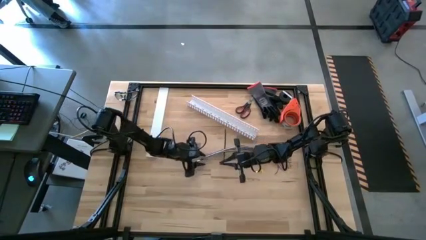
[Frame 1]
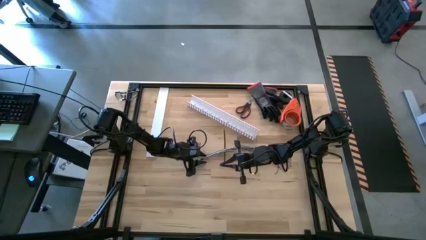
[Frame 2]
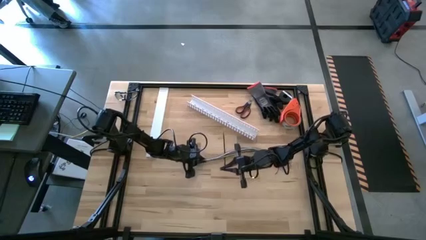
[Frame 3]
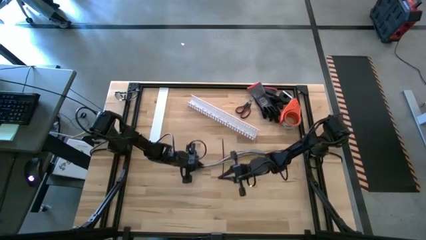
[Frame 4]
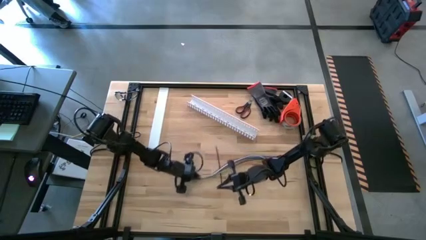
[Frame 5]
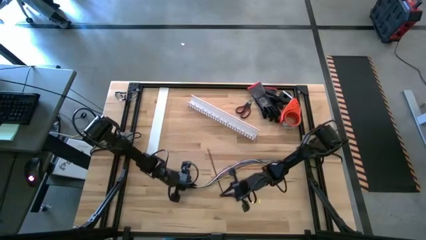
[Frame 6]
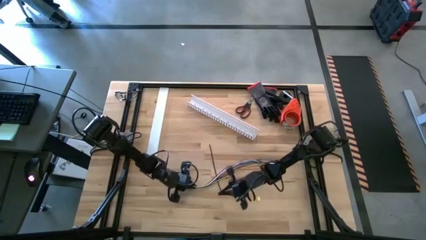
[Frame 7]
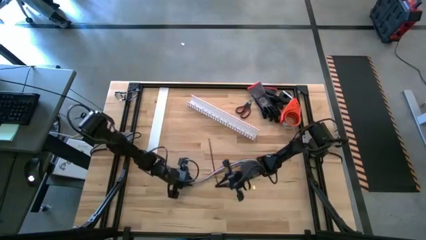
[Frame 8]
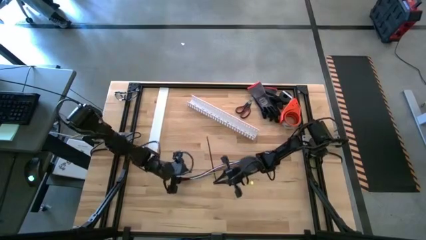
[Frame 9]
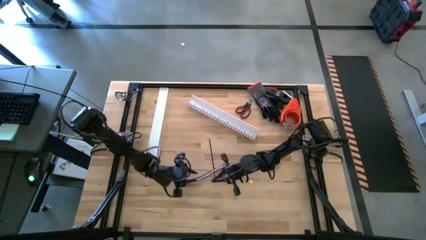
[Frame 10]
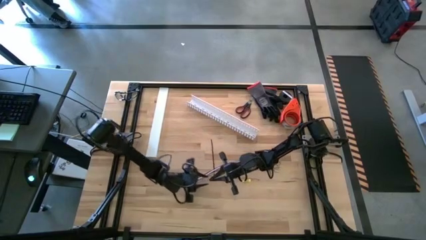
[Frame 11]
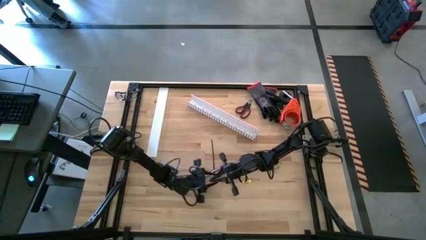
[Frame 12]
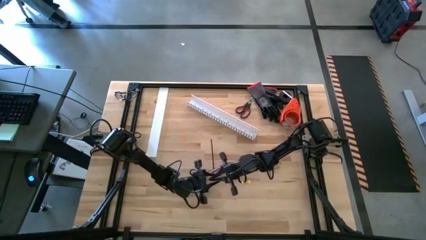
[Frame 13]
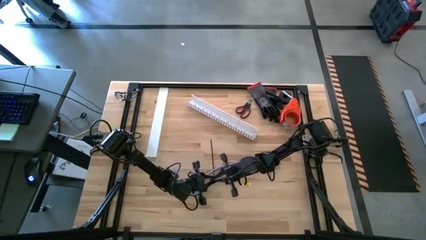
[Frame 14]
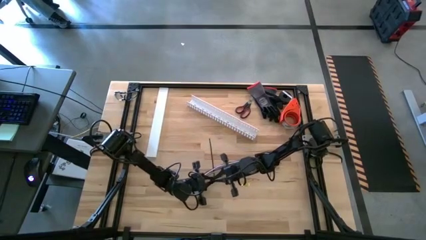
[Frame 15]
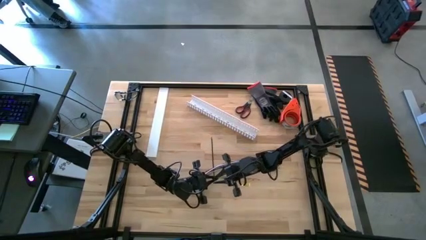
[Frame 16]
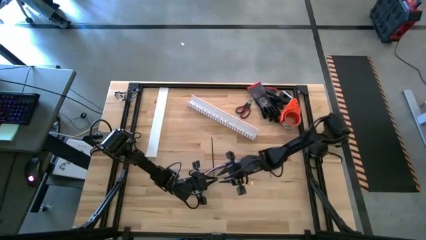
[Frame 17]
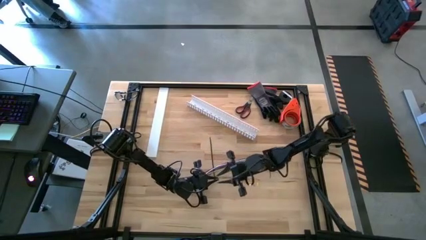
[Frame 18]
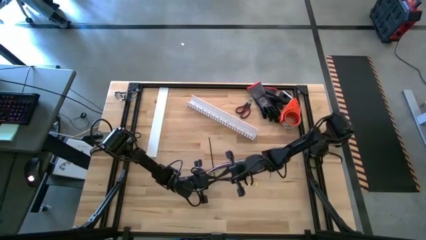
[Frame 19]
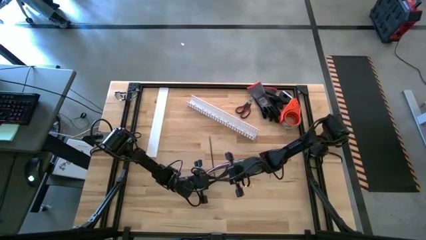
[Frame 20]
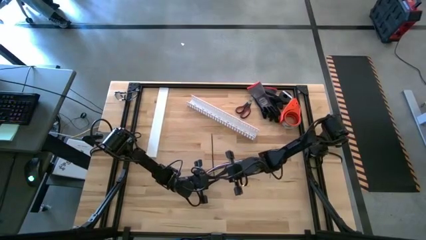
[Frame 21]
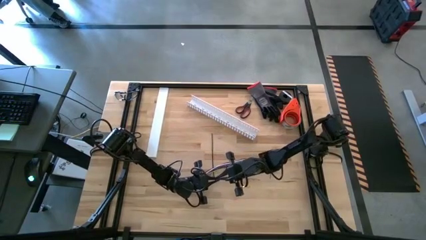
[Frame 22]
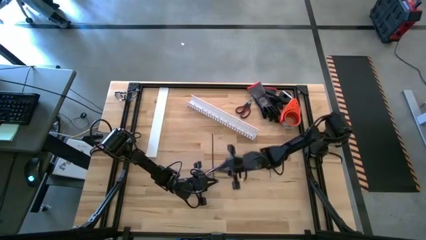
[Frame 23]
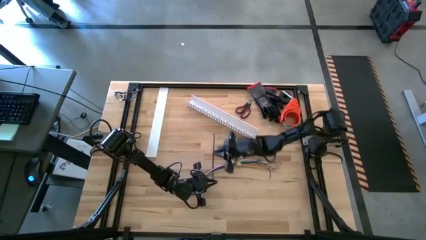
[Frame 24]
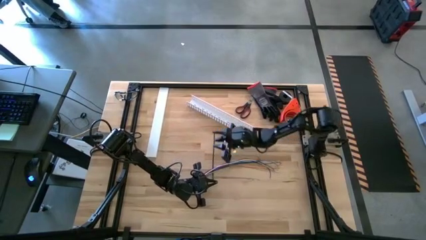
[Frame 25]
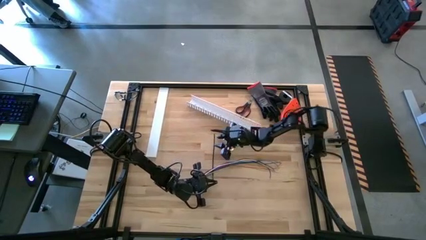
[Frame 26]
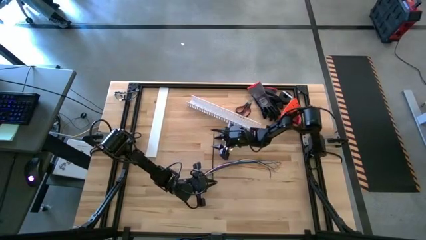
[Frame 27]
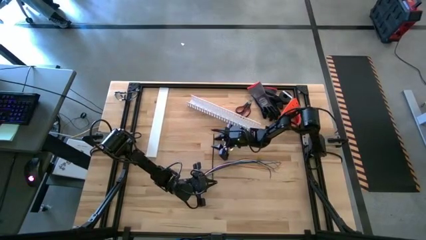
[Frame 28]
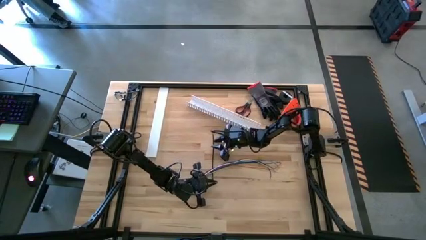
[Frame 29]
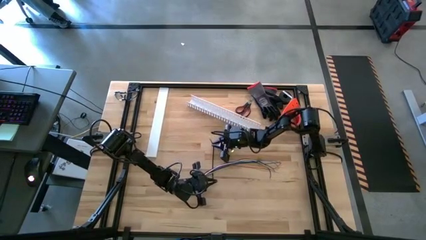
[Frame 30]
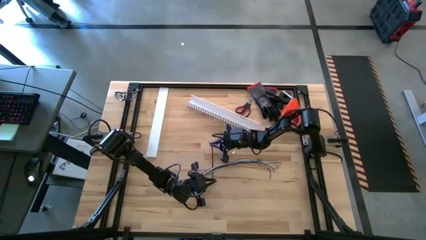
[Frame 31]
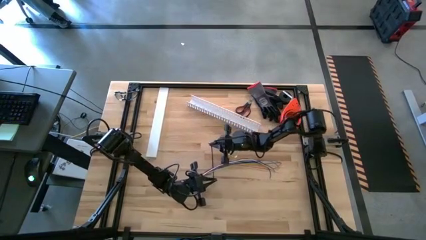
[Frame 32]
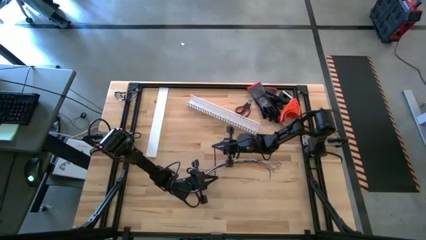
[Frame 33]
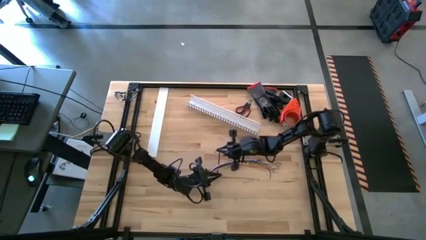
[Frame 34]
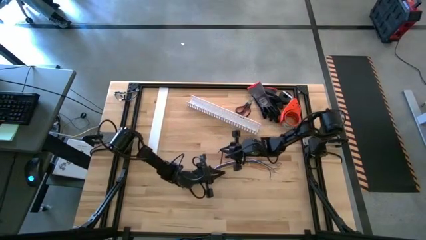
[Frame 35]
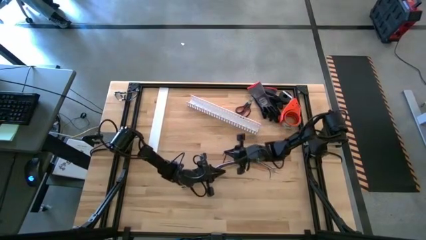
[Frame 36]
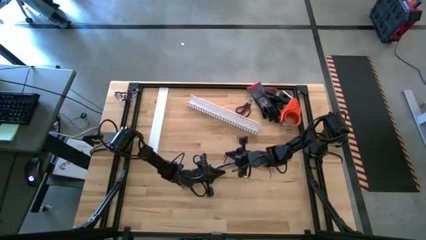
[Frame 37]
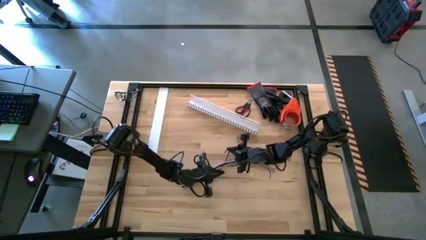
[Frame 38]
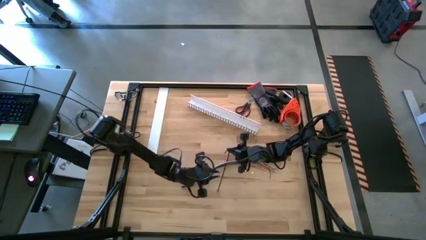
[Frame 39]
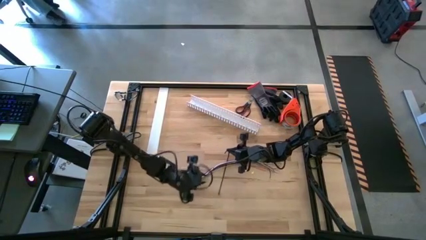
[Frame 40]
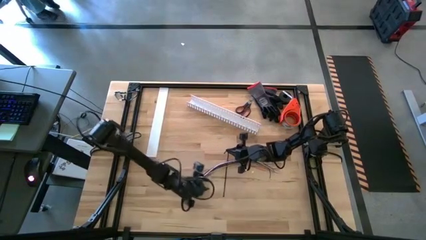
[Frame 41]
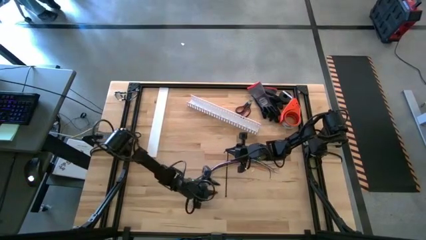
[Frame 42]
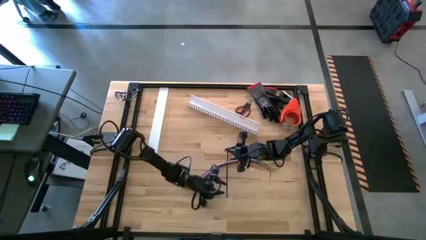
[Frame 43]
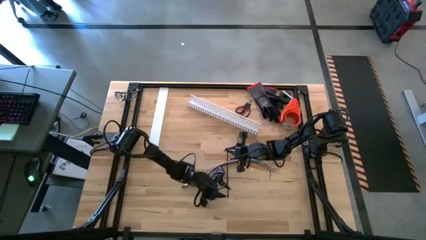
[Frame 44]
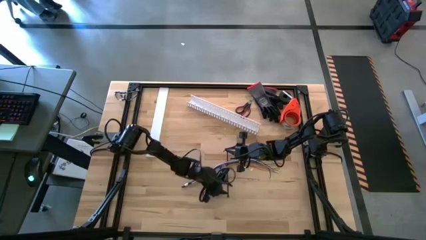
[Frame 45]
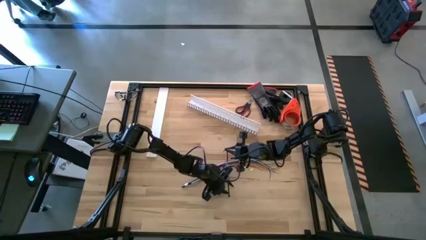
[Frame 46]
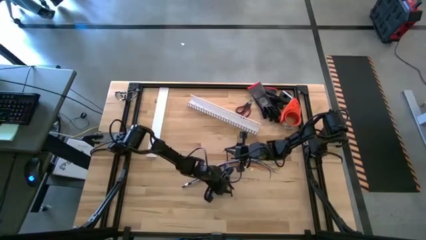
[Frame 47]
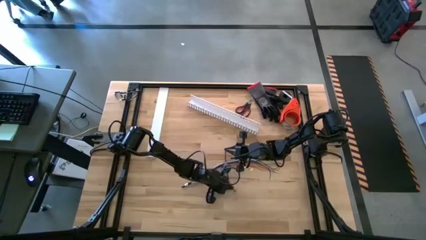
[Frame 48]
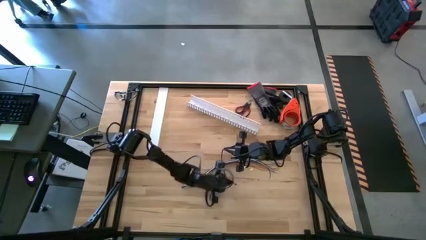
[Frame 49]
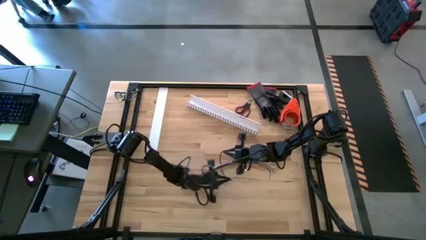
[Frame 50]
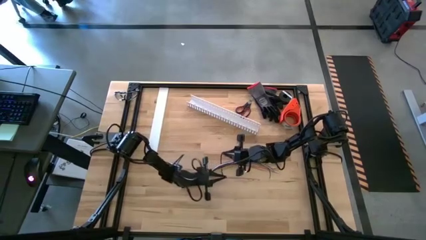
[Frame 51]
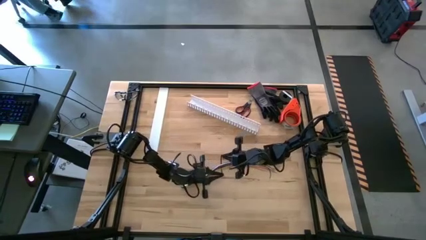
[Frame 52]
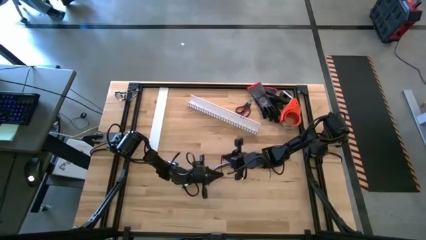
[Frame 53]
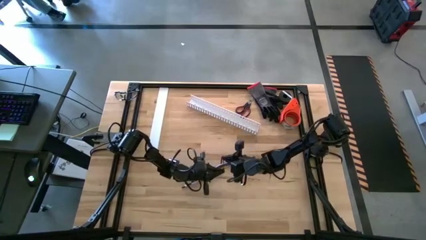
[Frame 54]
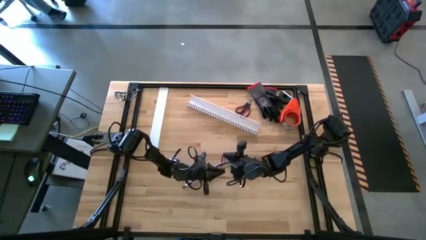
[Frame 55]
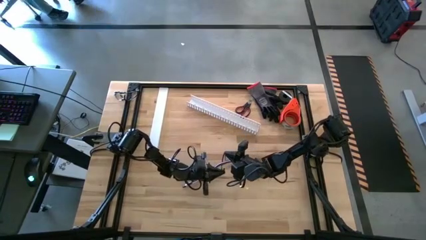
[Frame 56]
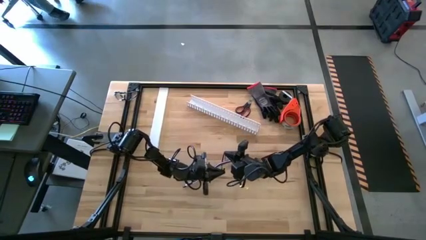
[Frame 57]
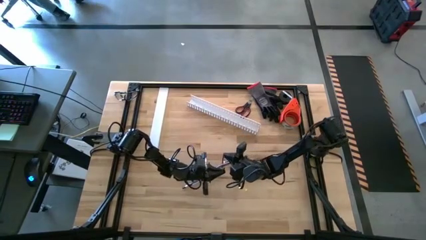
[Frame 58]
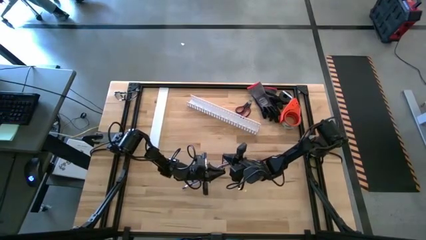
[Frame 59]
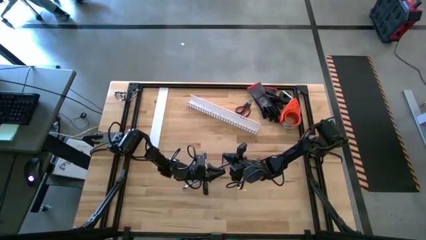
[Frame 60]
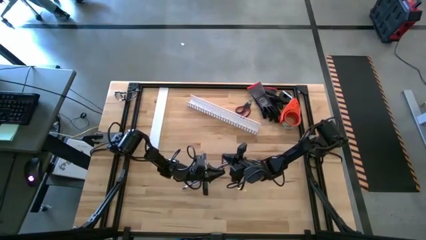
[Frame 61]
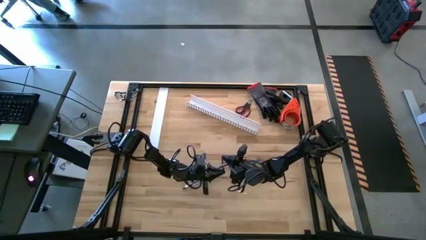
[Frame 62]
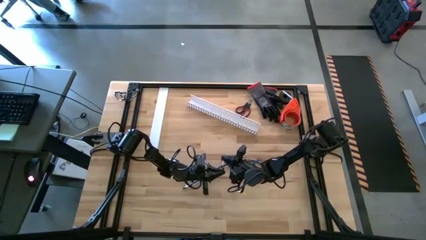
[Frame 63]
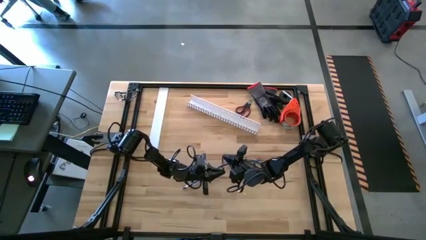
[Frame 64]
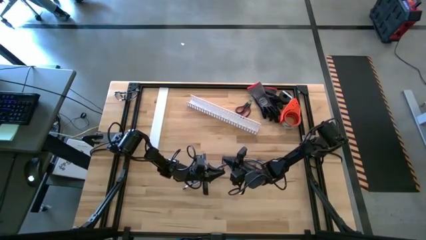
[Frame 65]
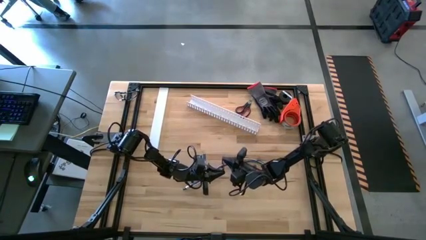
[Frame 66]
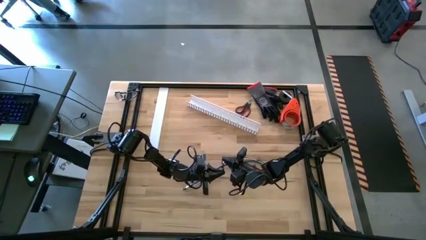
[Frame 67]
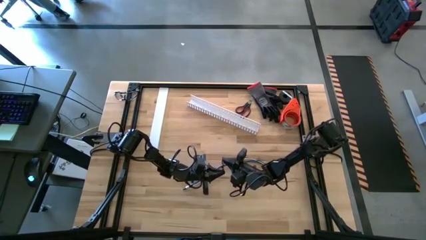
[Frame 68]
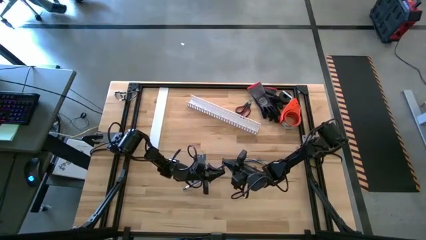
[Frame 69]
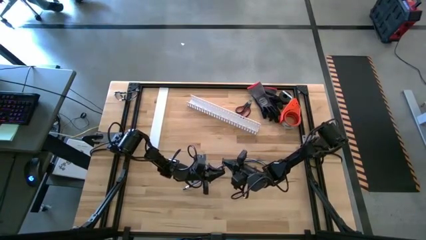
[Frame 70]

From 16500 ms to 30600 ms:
Task: Ziptie cables
Wrap the black zip tie on the cable wires
